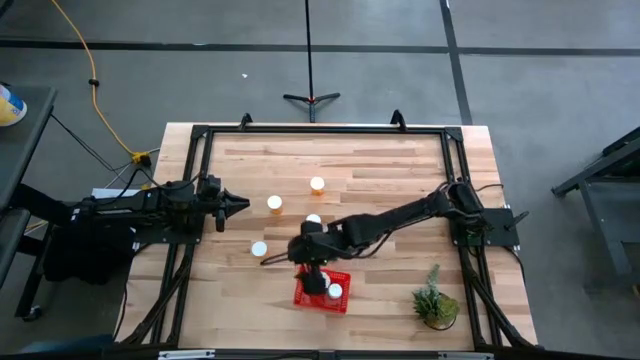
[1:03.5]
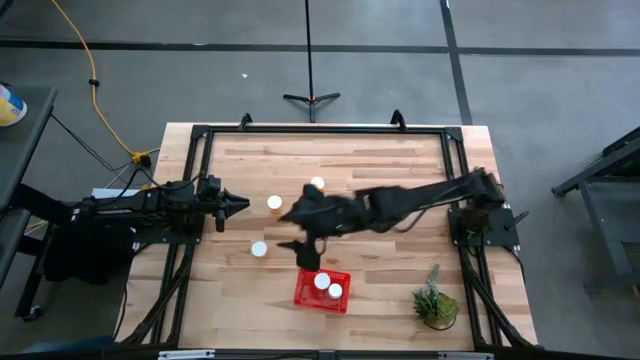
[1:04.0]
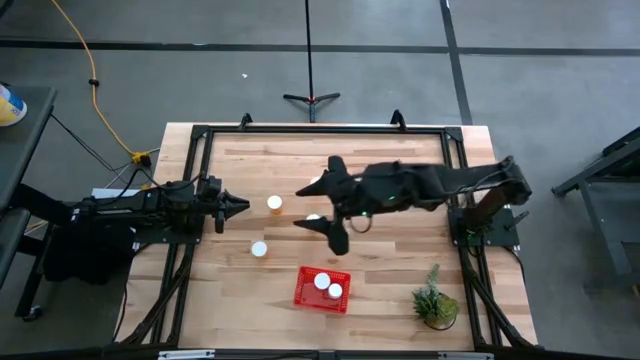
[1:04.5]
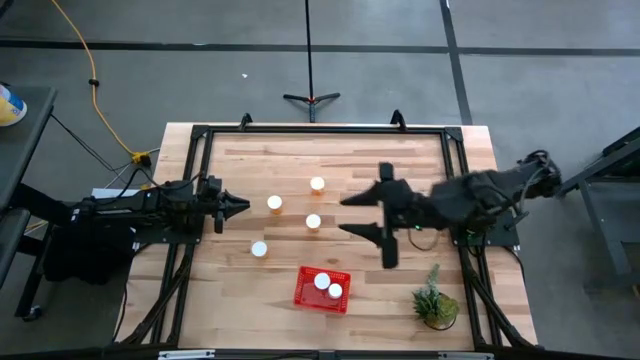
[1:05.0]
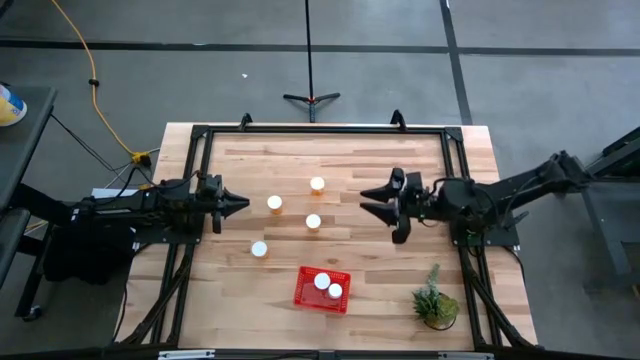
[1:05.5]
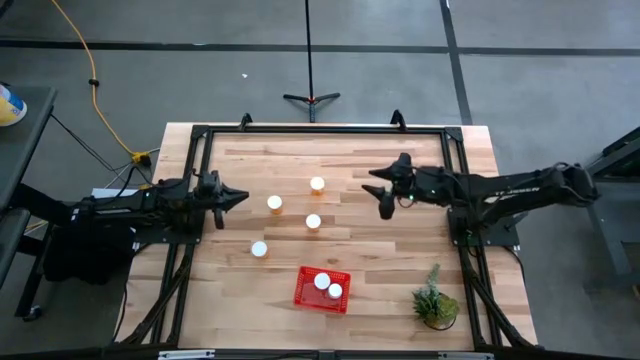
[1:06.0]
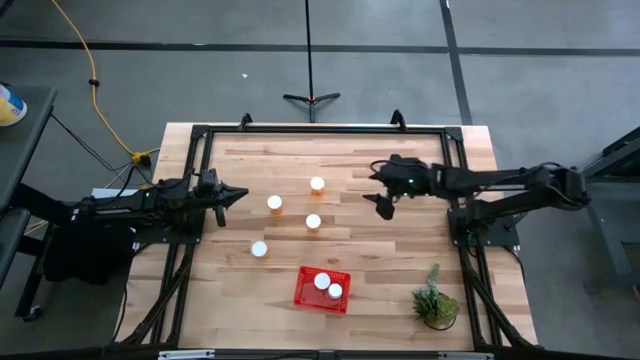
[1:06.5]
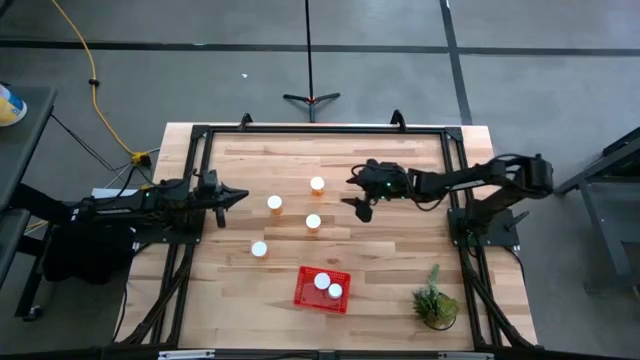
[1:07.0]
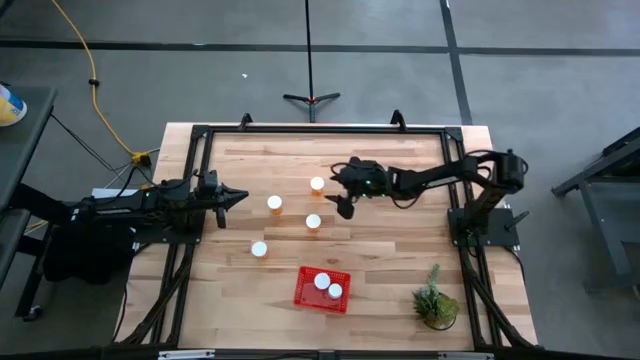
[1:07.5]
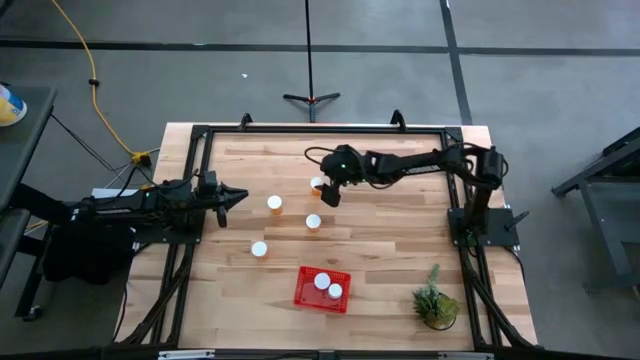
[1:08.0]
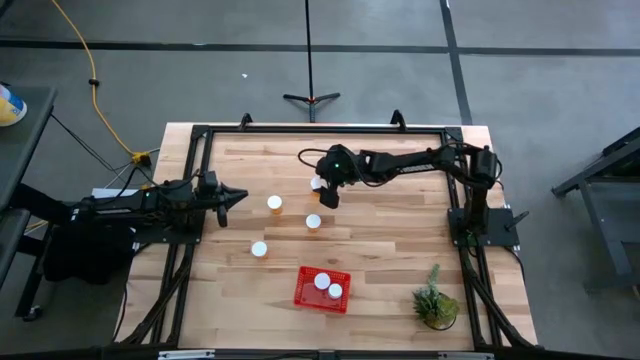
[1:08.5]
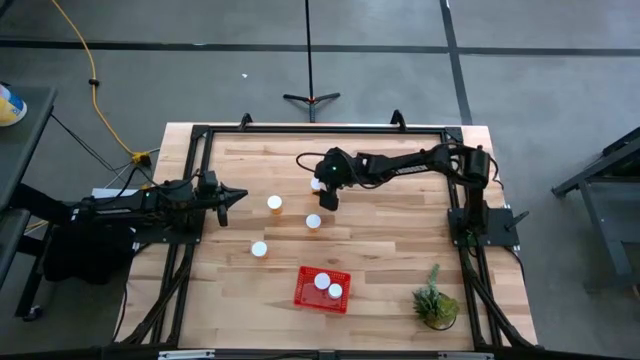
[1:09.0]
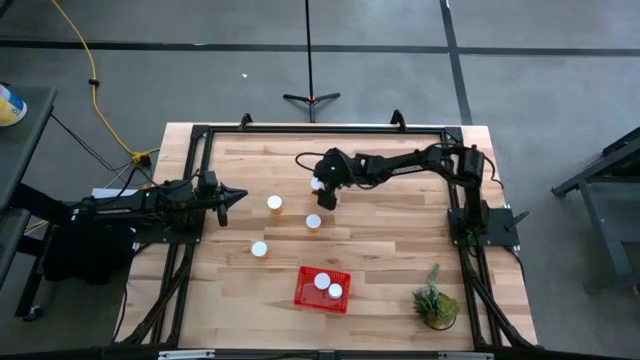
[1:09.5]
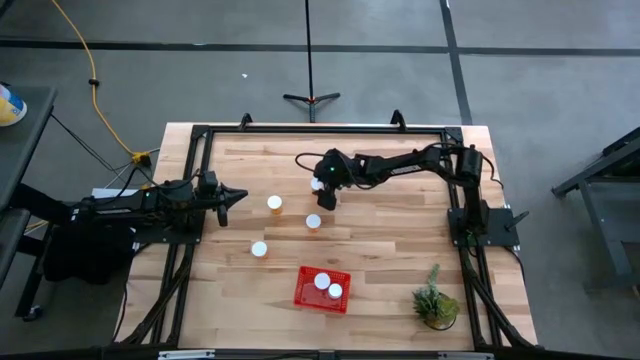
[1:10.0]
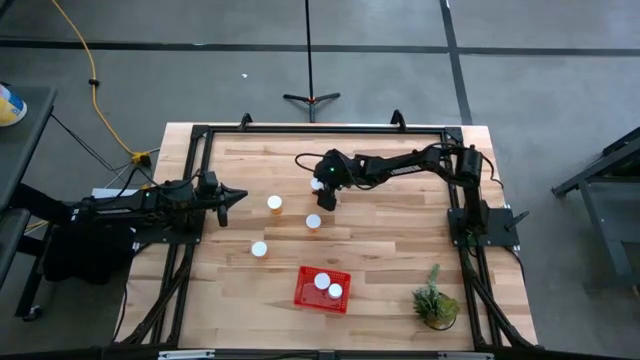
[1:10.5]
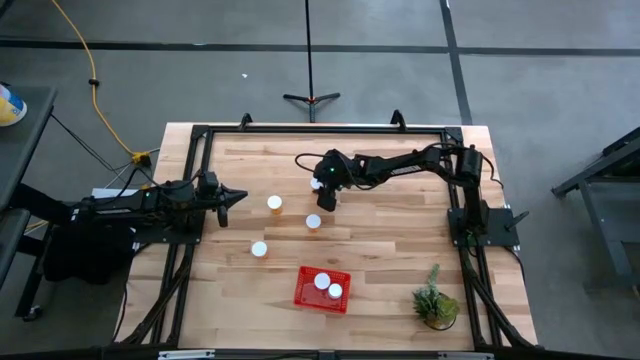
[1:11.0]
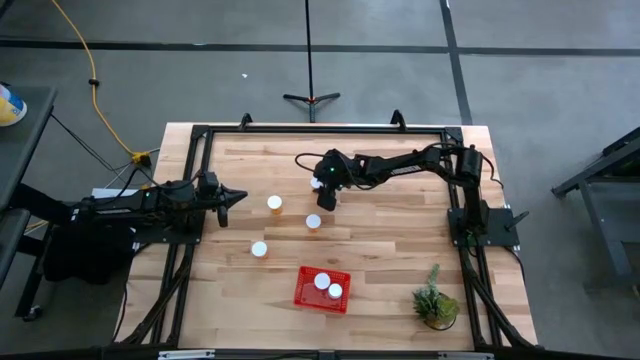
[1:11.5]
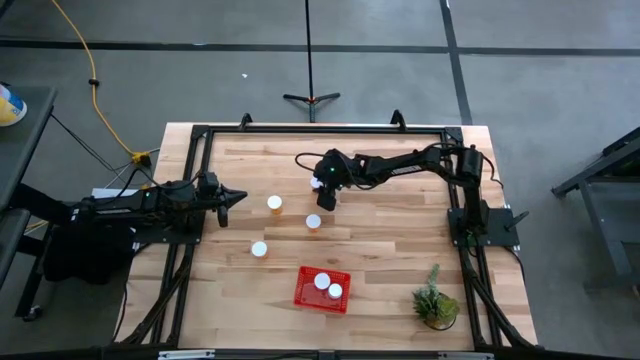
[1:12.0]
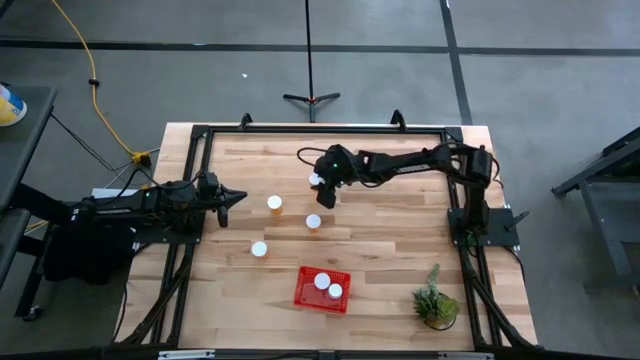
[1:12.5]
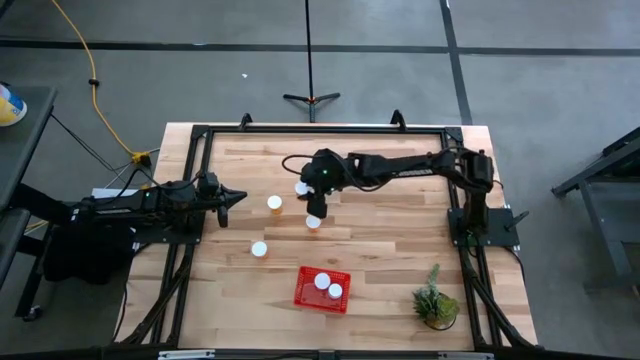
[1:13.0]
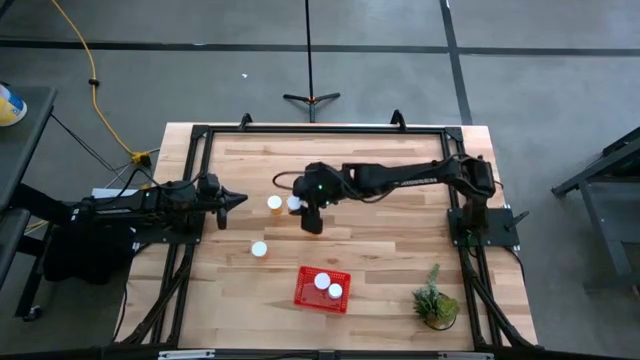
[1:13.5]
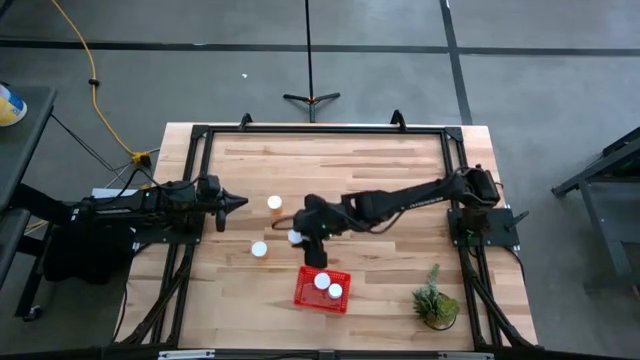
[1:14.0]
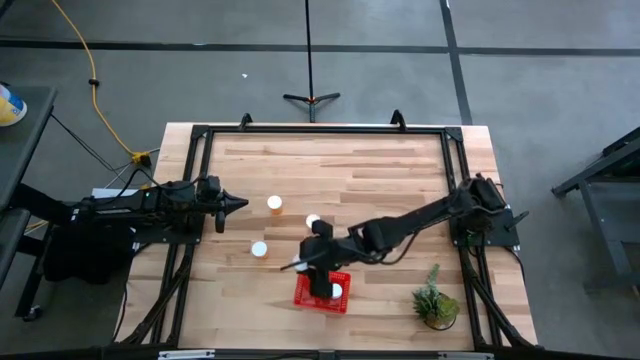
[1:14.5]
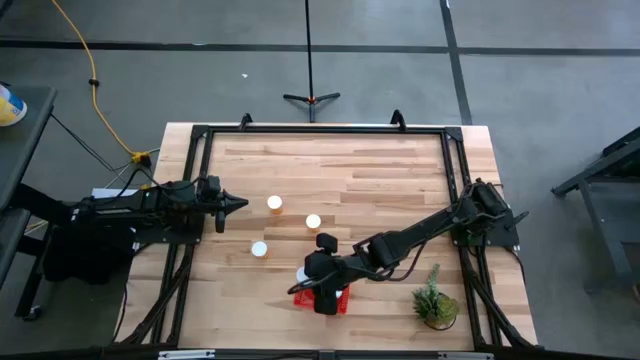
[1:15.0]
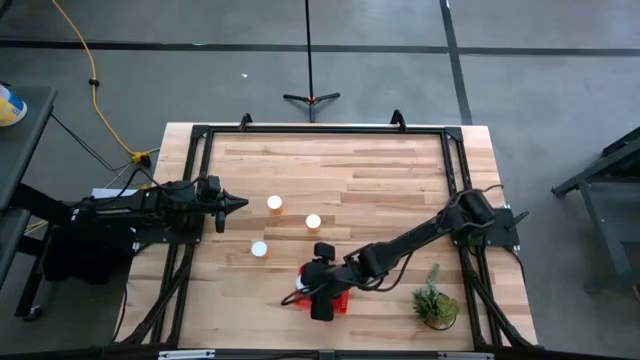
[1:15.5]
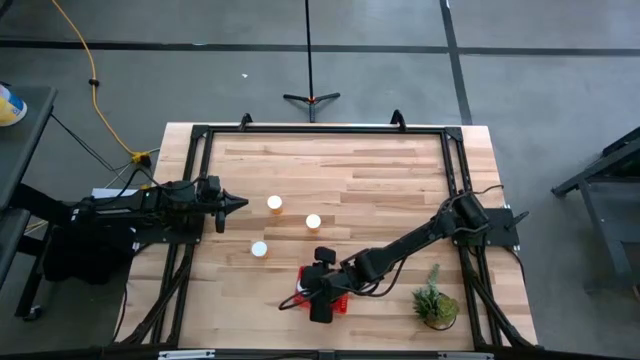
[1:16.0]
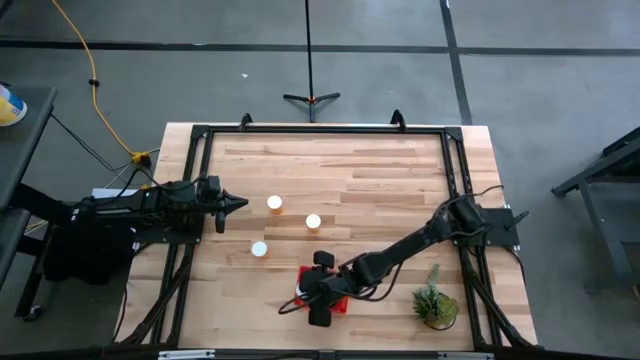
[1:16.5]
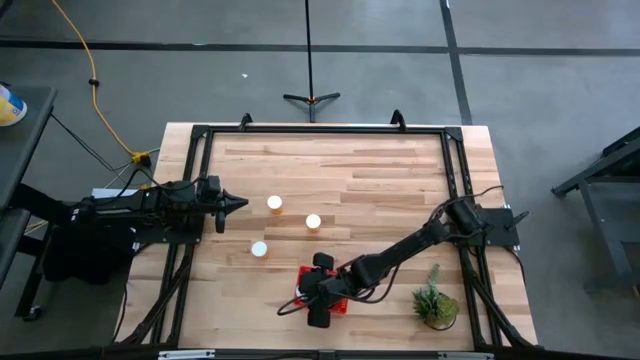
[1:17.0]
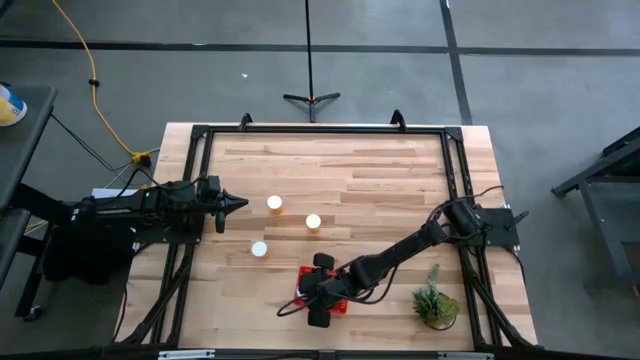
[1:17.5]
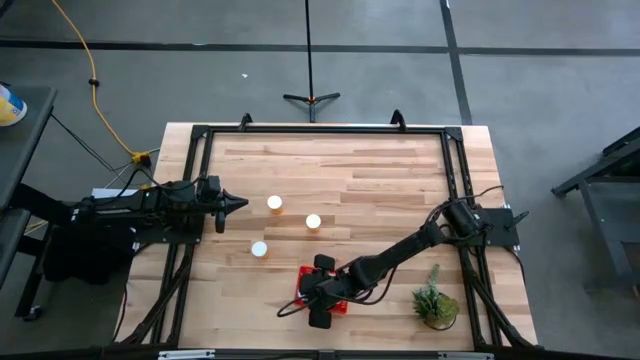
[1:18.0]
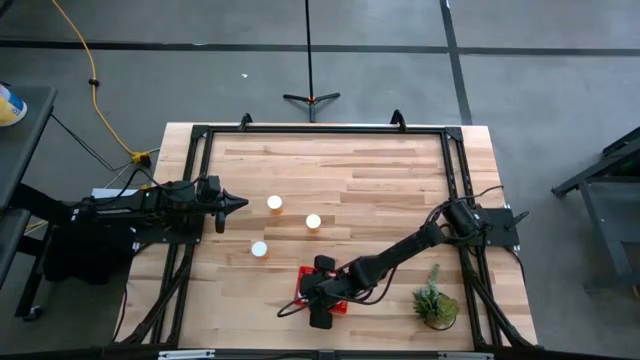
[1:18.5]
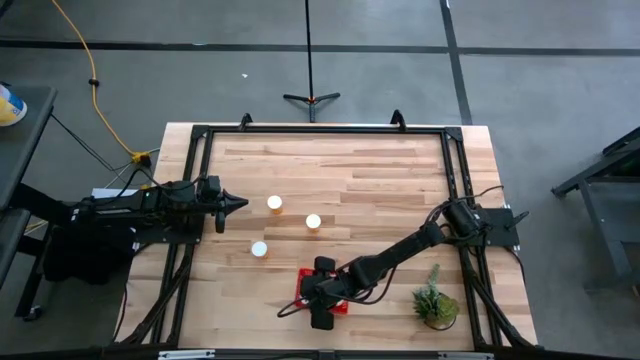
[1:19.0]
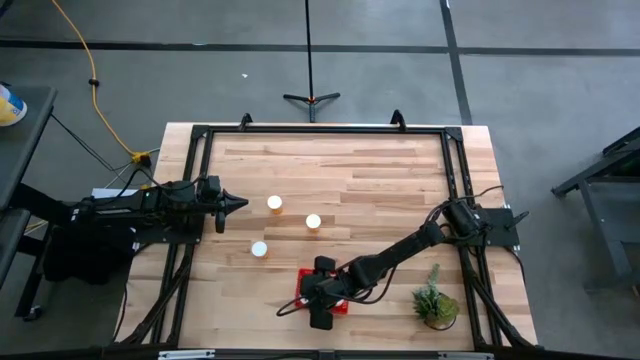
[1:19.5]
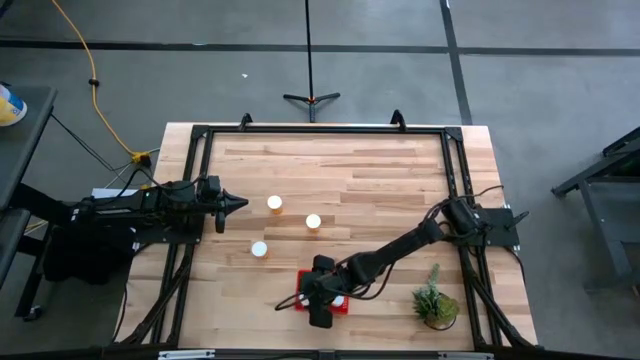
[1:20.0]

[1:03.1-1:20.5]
Task: Pick and place pill bottles into a basket
Put the orange pill bottle into the red basket

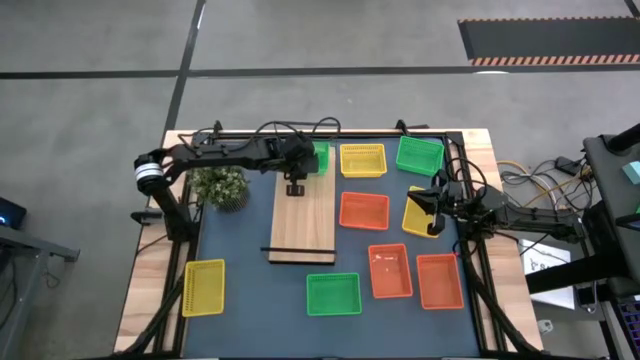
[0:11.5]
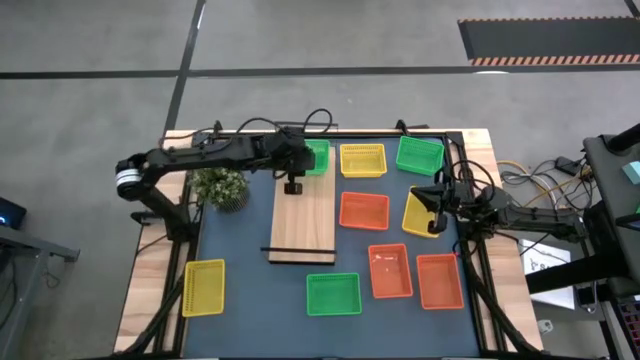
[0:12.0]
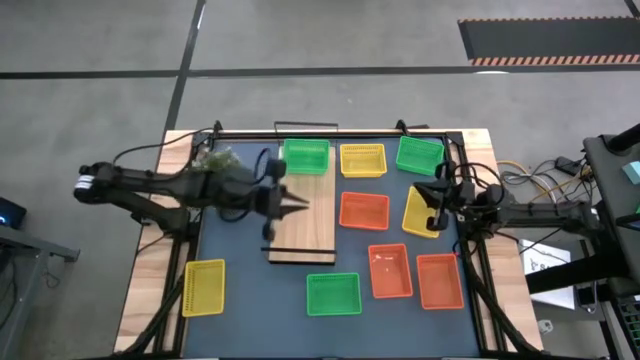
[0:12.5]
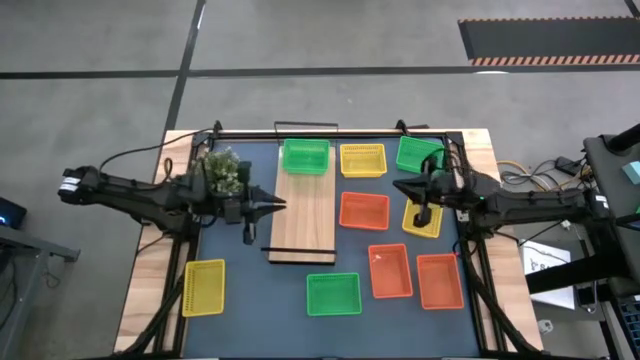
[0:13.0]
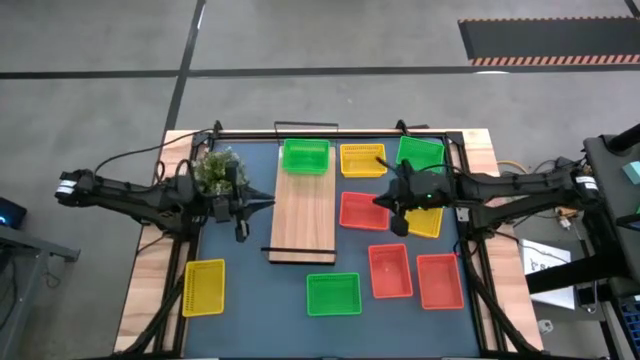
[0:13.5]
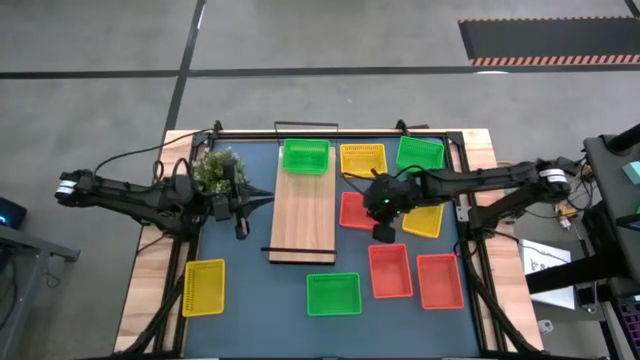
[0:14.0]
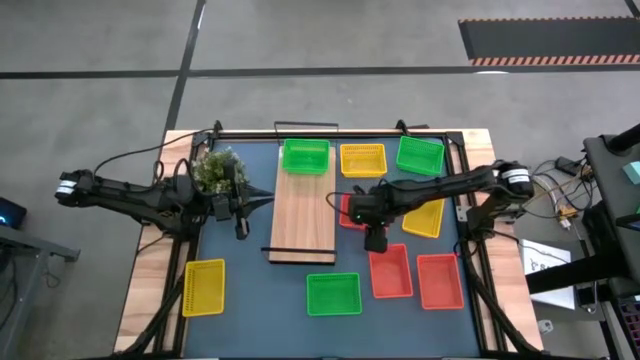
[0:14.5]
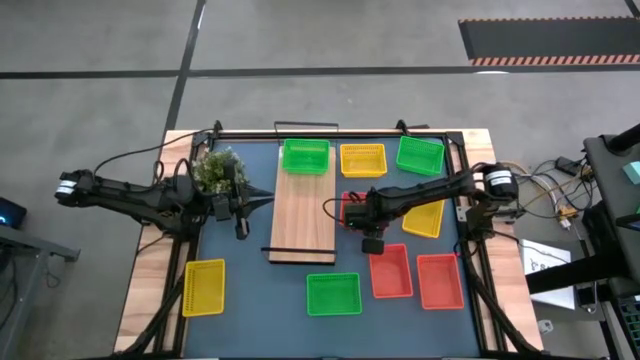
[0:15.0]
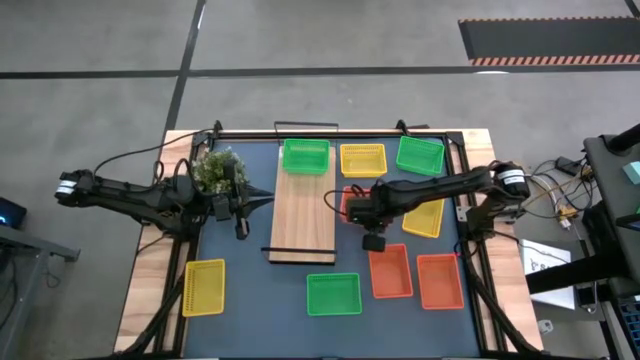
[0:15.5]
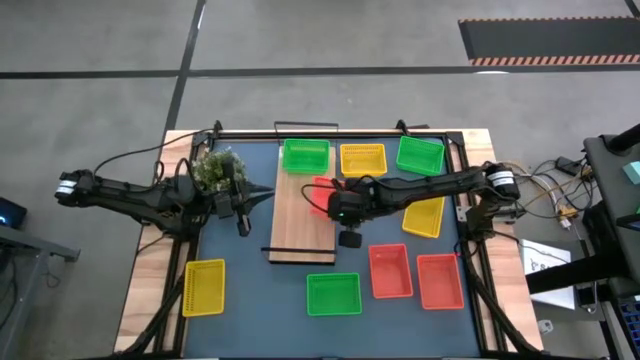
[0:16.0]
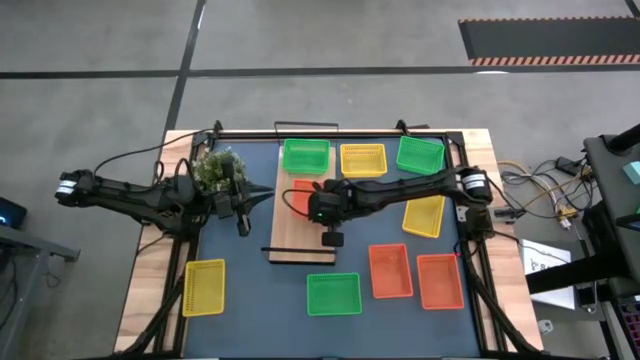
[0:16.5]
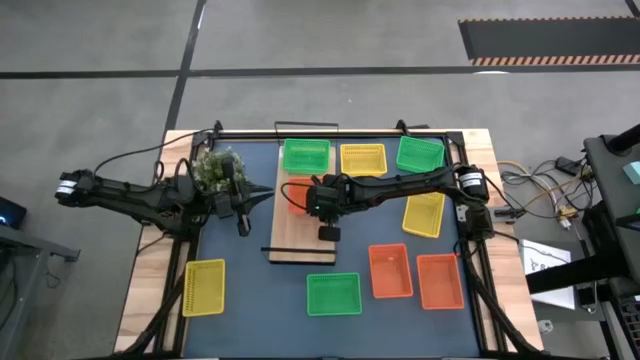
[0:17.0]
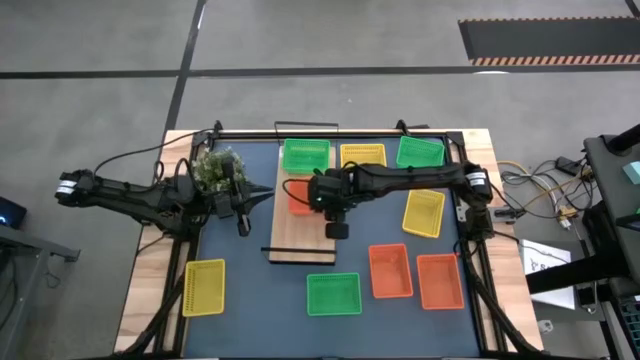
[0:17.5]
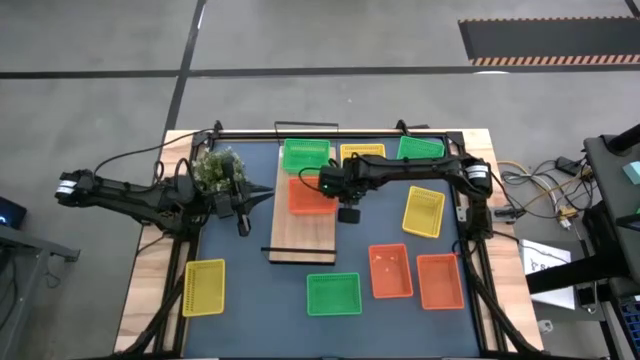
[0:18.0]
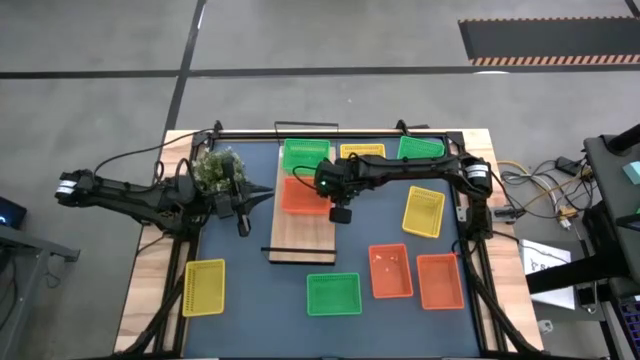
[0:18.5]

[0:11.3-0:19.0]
Task: Stack baskets on shelf by color
Put the top orange bin on the shelf
